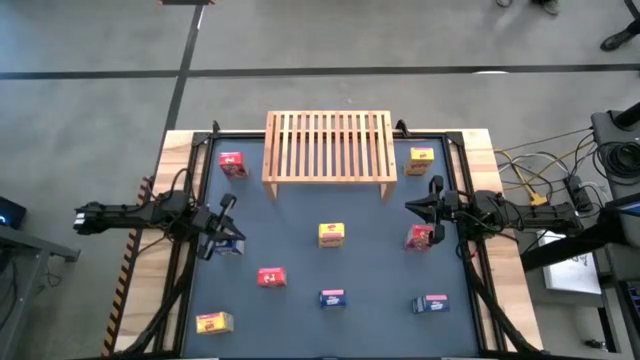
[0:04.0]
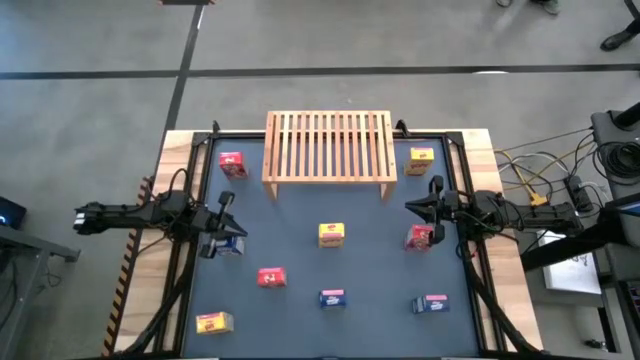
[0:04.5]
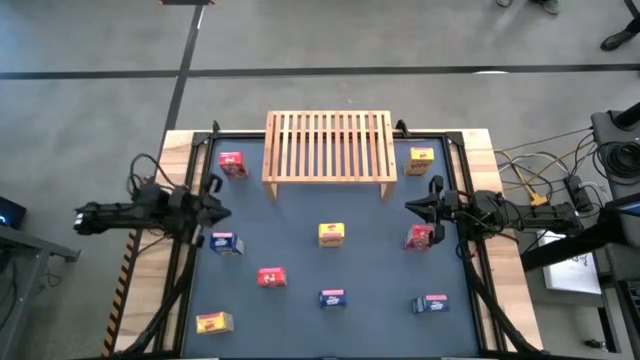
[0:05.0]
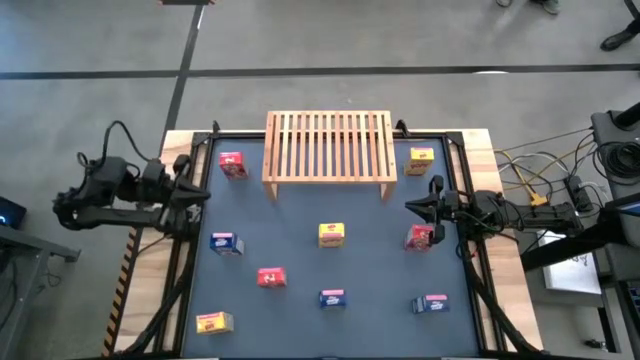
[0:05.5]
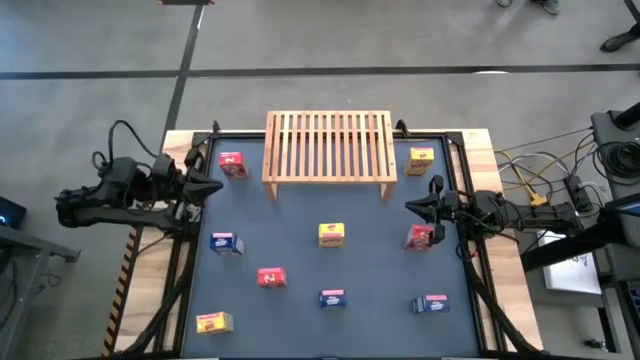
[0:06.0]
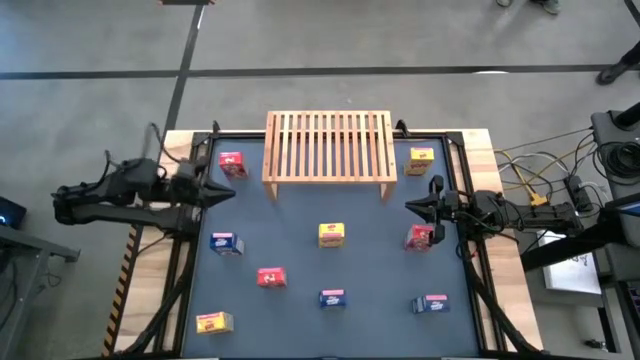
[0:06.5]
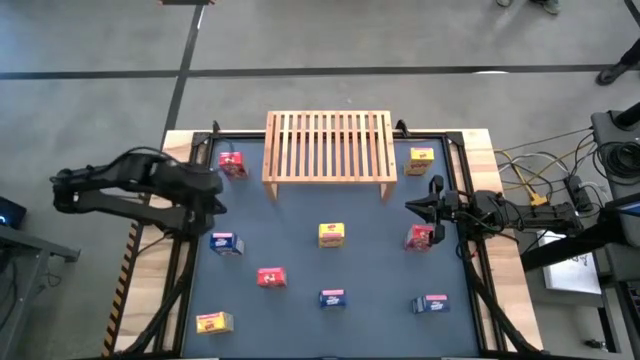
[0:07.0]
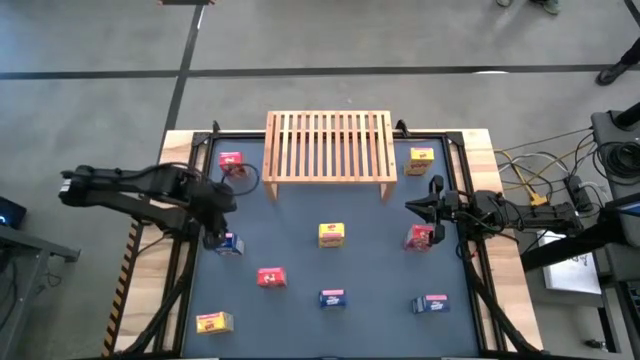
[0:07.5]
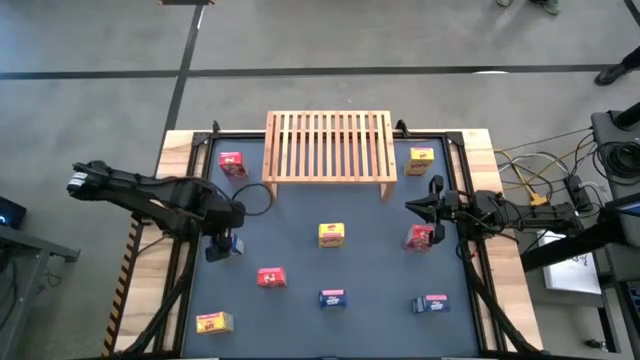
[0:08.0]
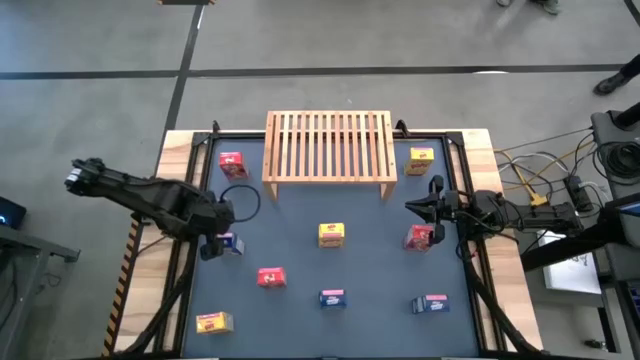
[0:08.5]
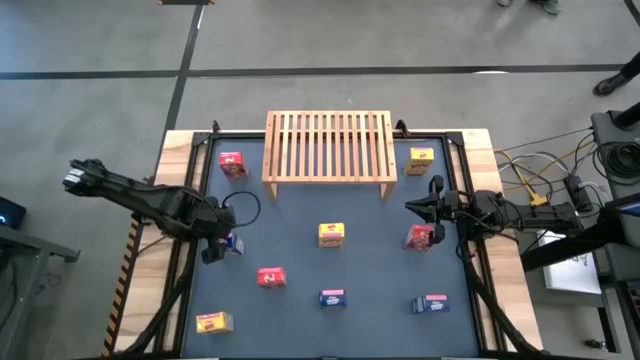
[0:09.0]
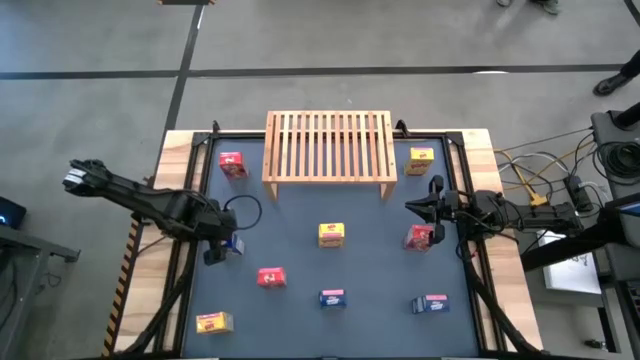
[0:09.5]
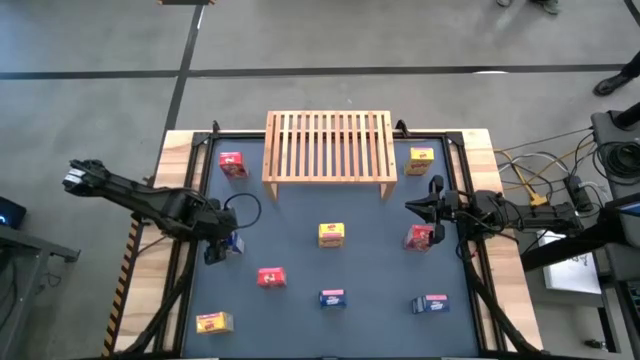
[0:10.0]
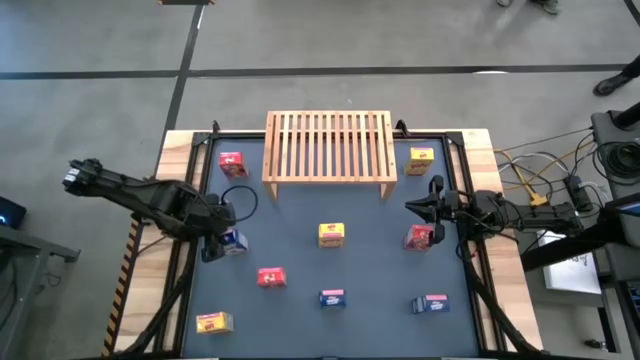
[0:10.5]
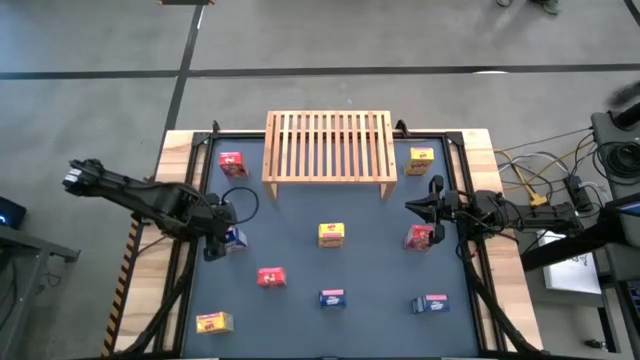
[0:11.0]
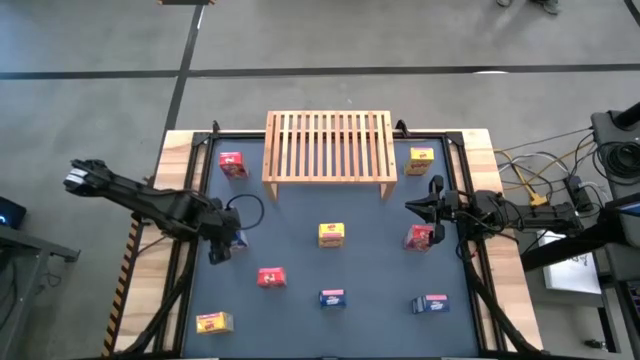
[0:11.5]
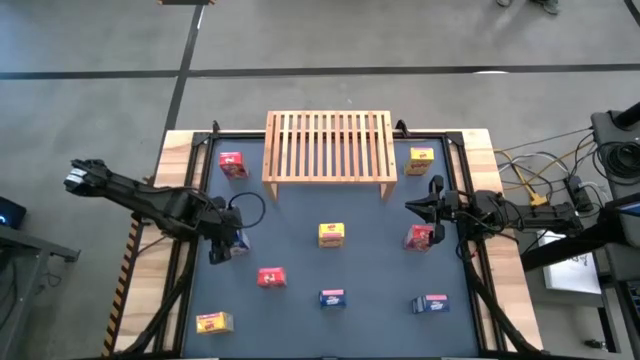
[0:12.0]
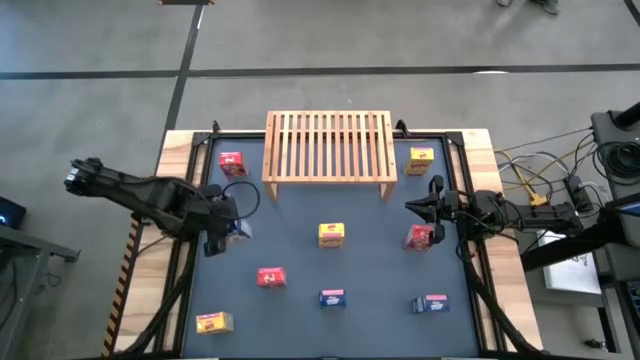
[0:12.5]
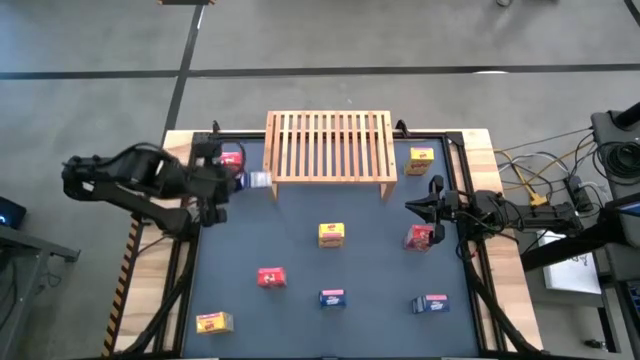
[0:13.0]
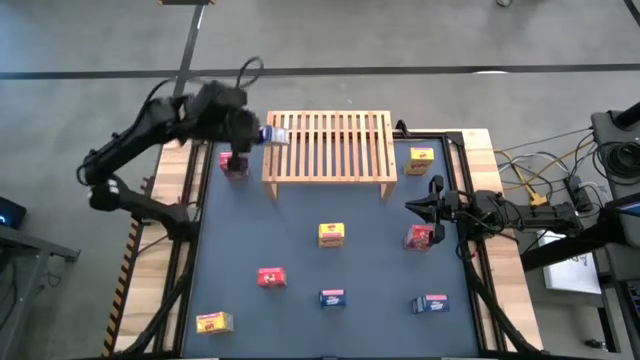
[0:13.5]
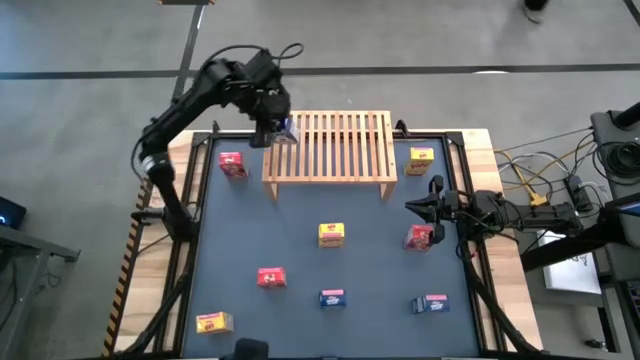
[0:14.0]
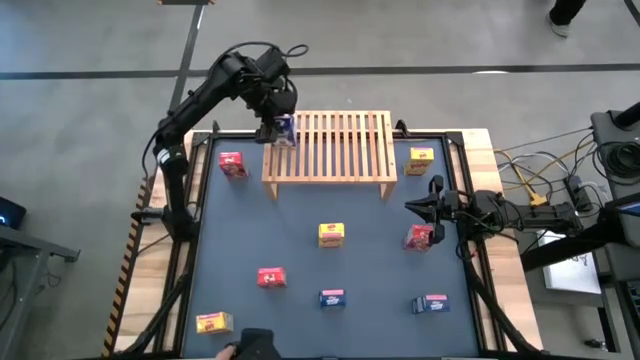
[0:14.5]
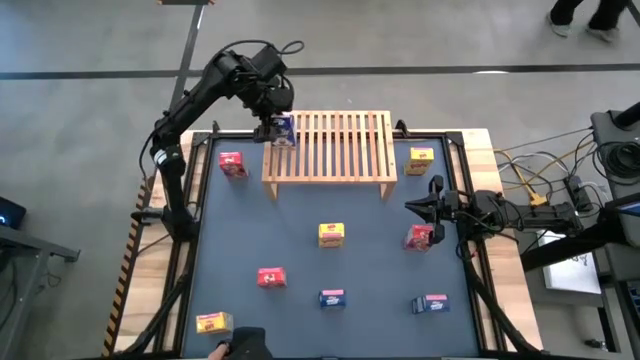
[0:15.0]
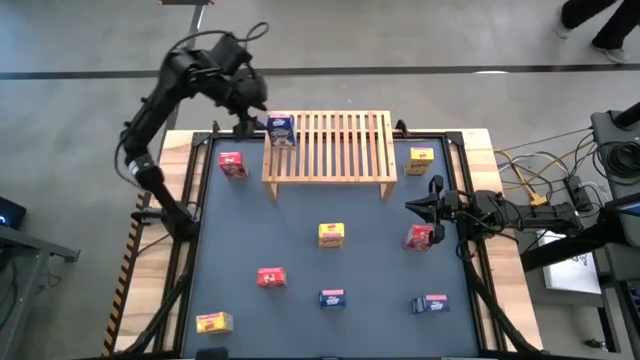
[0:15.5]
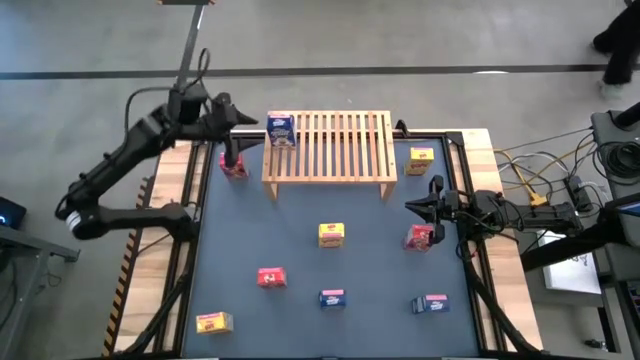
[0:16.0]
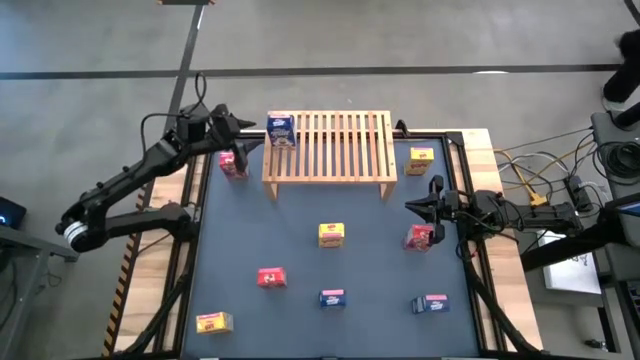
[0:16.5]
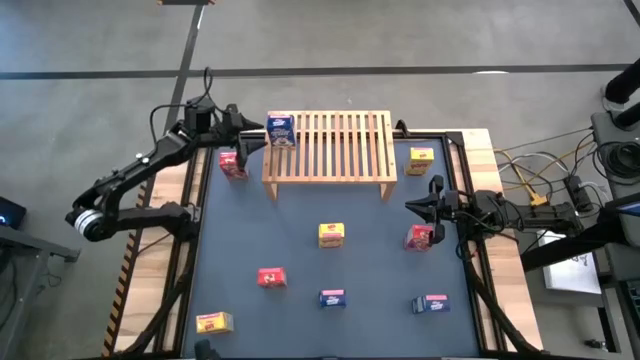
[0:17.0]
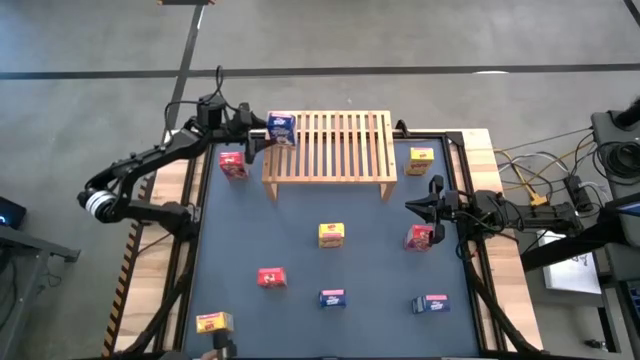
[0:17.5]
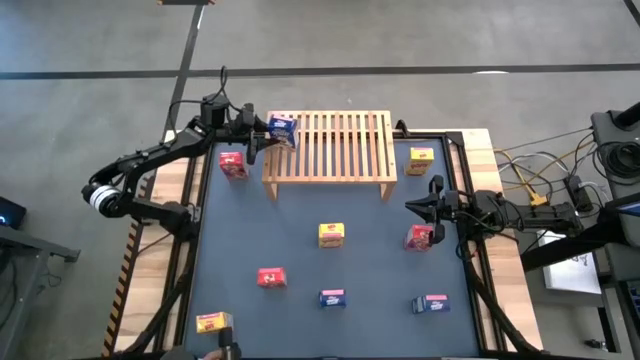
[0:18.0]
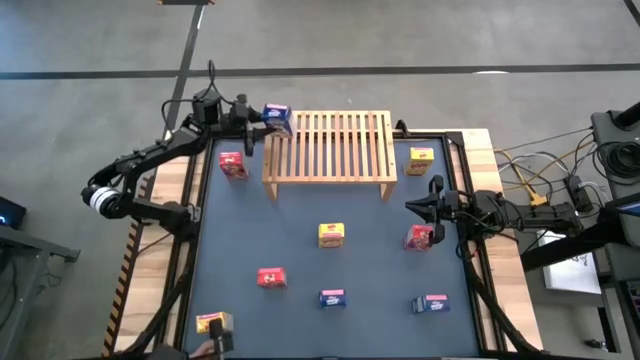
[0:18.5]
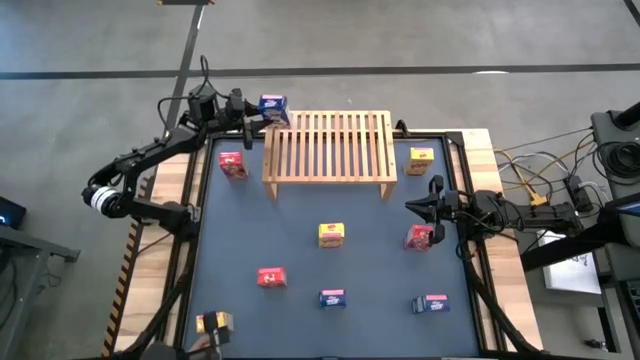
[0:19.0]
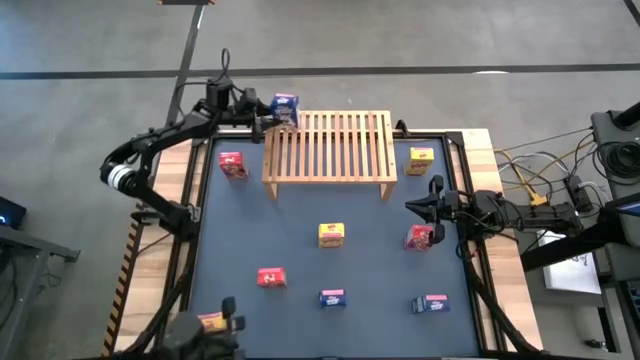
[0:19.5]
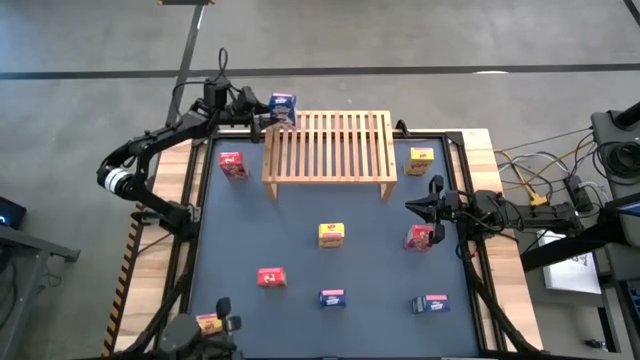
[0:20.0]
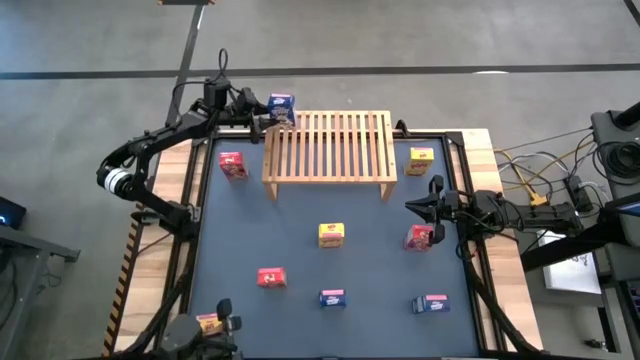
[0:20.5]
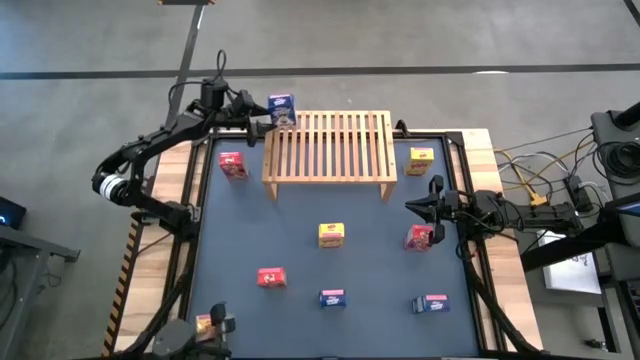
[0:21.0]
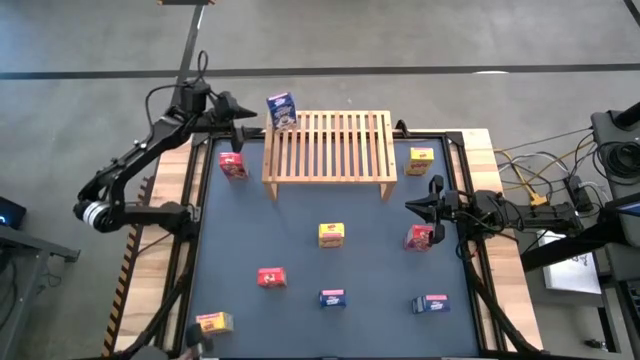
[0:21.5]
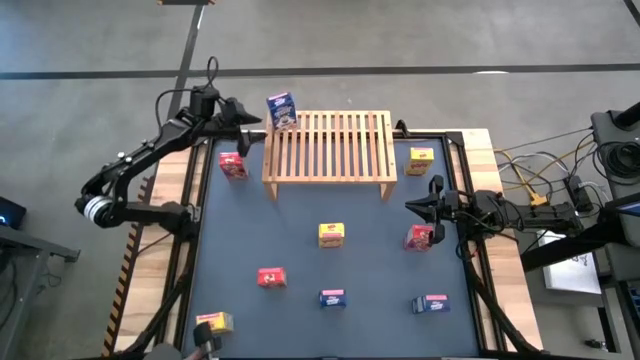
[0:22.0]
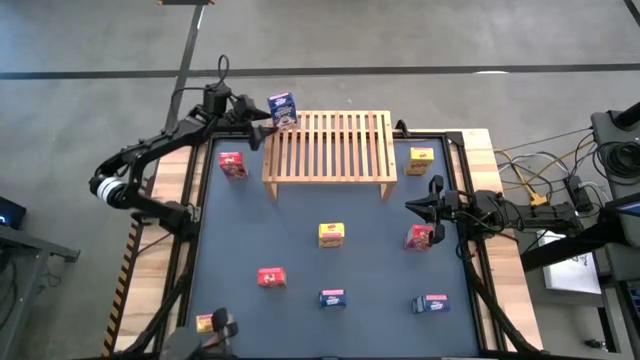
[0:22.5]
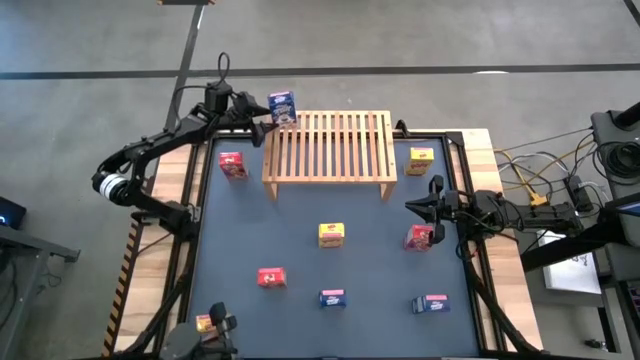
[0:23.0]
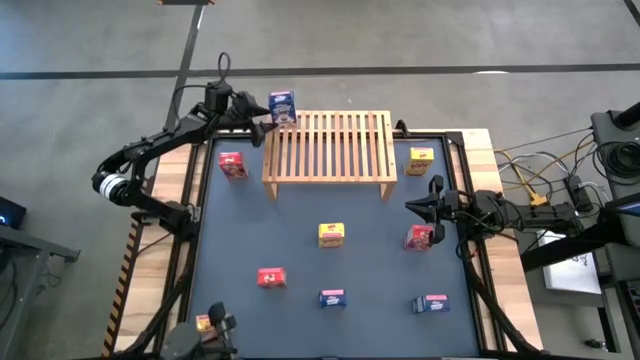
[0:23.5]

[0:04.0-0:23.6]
Task: Stack cereal on shelf
Put the top blue cereal box on the shelf
